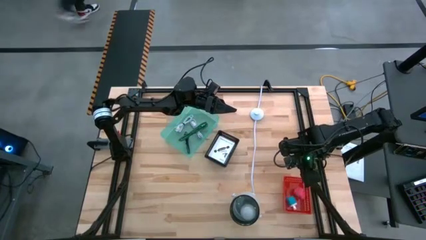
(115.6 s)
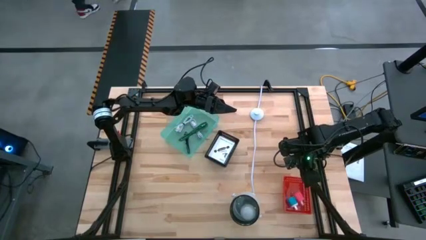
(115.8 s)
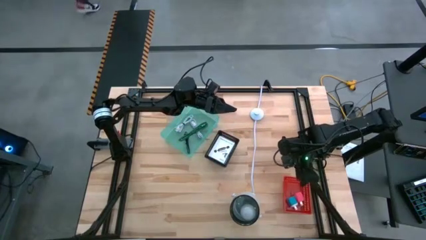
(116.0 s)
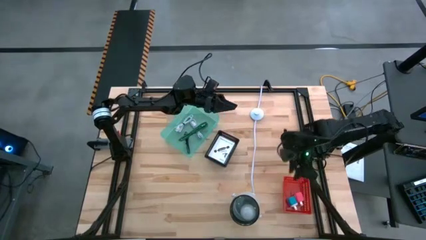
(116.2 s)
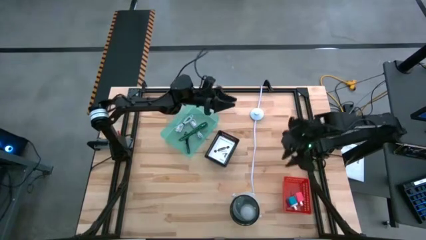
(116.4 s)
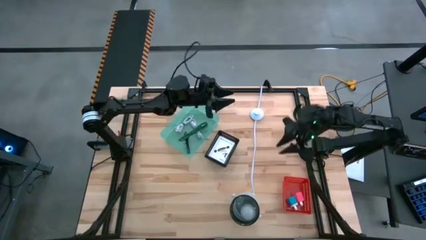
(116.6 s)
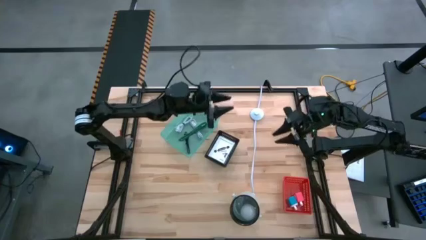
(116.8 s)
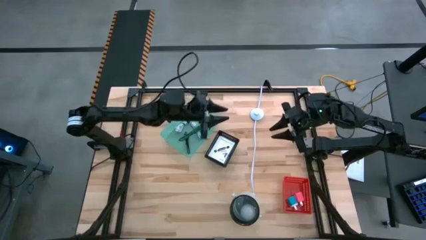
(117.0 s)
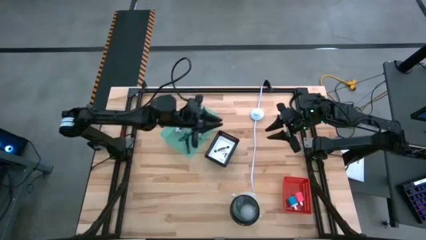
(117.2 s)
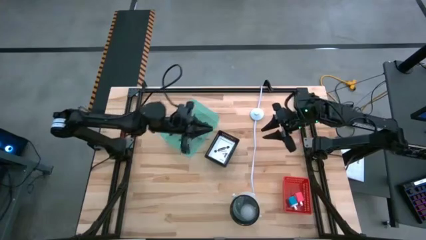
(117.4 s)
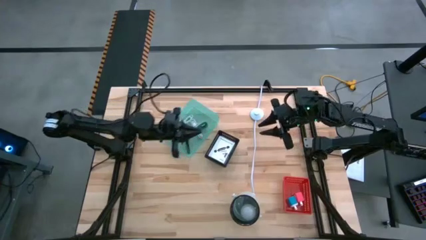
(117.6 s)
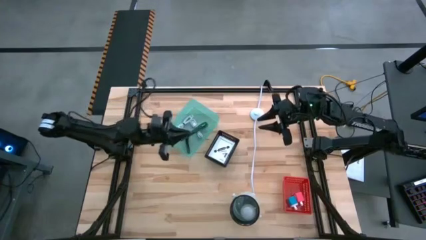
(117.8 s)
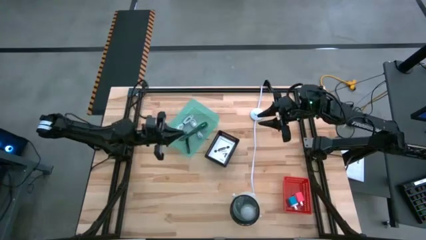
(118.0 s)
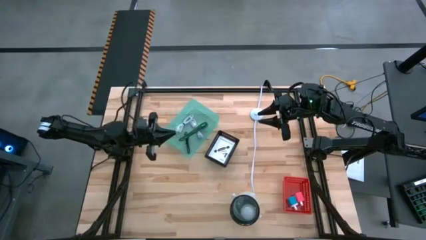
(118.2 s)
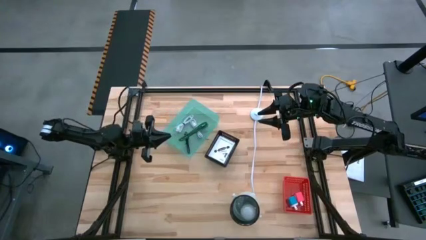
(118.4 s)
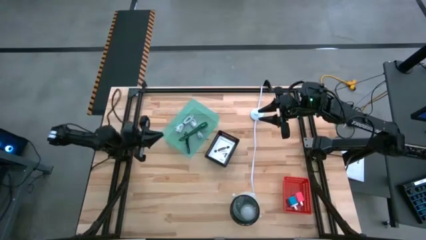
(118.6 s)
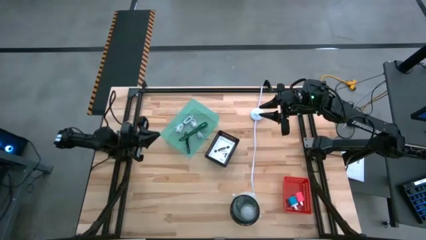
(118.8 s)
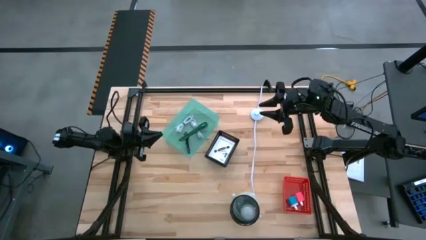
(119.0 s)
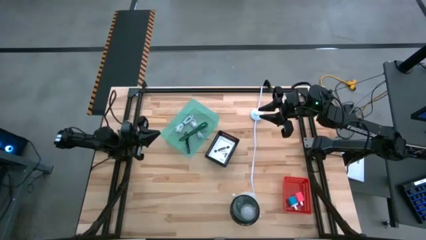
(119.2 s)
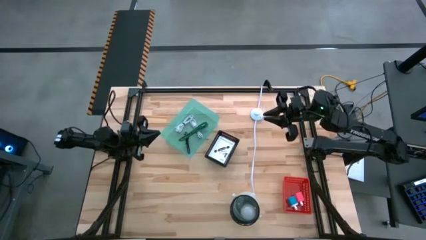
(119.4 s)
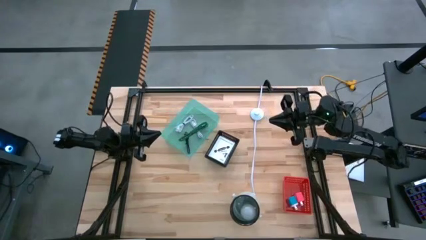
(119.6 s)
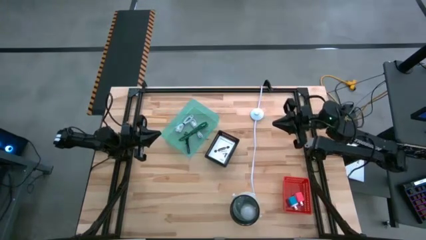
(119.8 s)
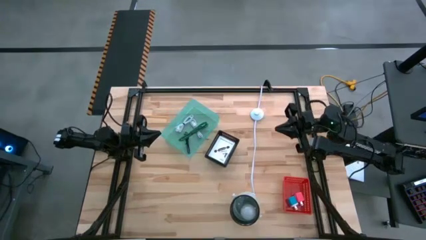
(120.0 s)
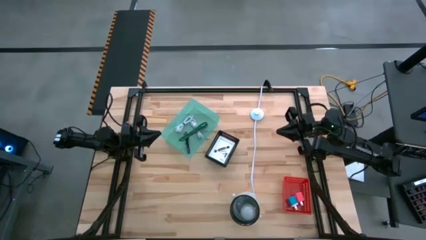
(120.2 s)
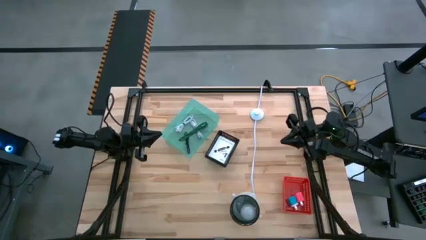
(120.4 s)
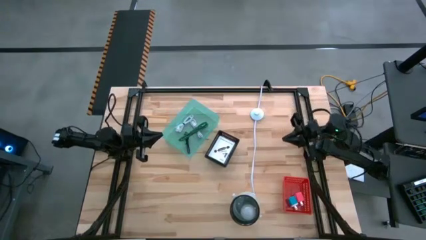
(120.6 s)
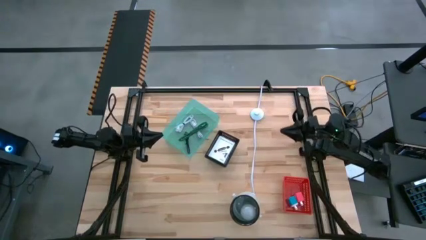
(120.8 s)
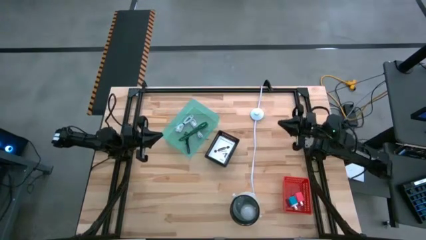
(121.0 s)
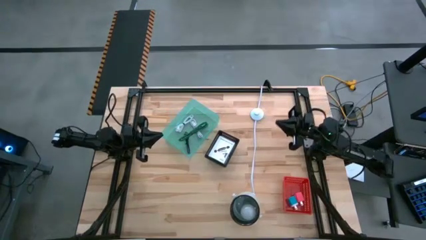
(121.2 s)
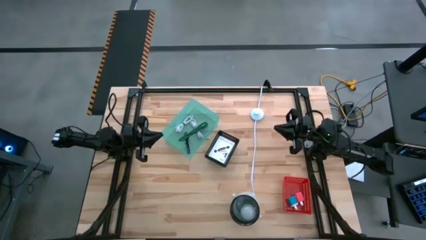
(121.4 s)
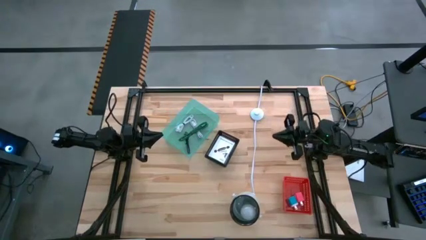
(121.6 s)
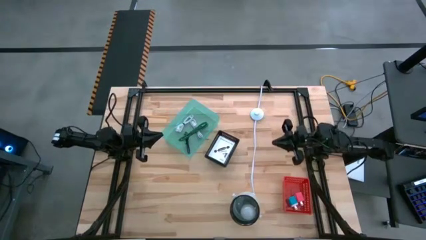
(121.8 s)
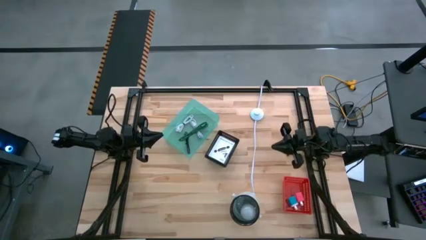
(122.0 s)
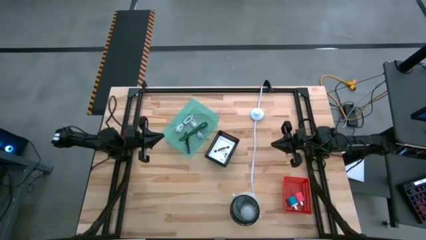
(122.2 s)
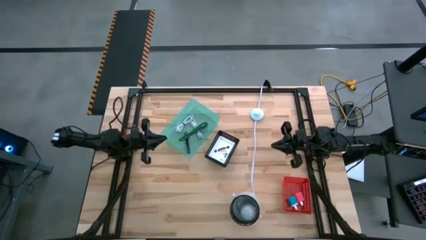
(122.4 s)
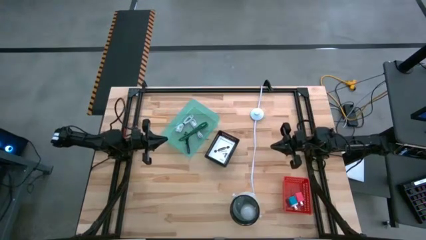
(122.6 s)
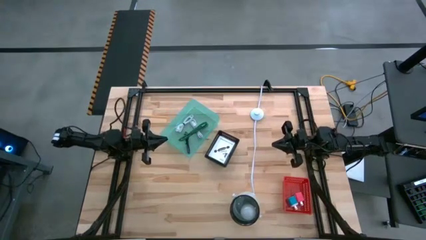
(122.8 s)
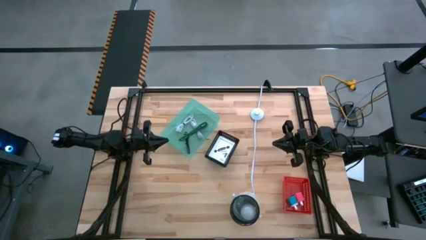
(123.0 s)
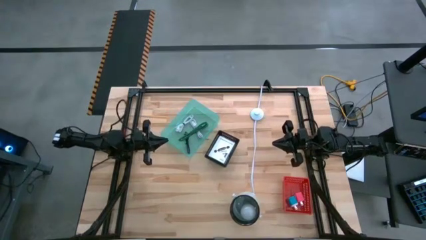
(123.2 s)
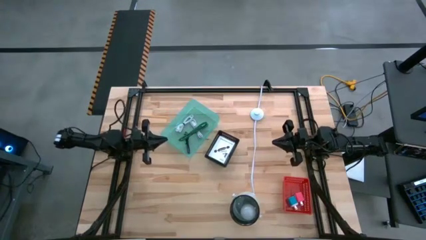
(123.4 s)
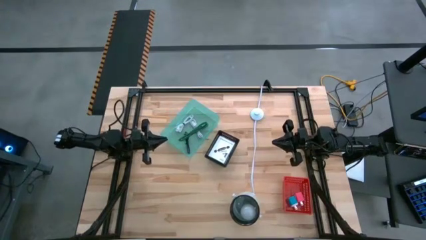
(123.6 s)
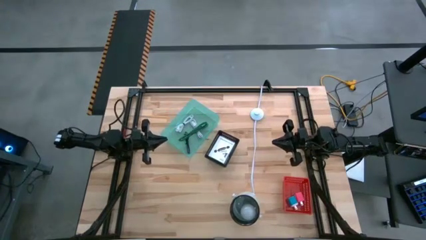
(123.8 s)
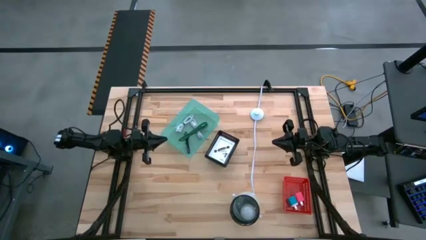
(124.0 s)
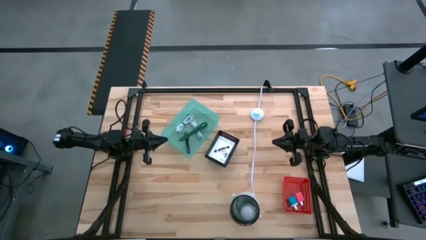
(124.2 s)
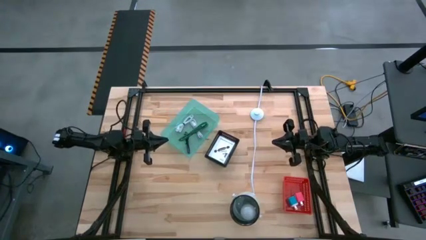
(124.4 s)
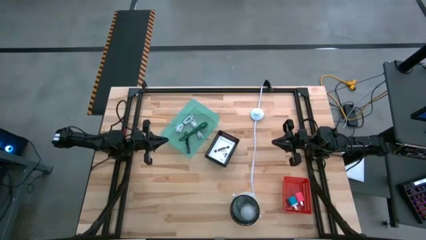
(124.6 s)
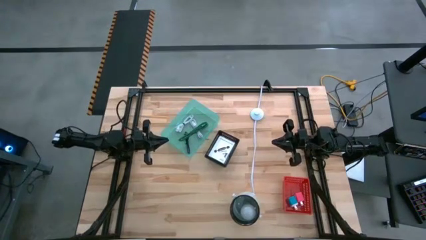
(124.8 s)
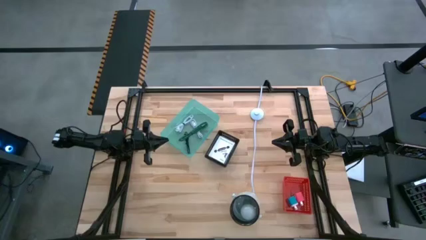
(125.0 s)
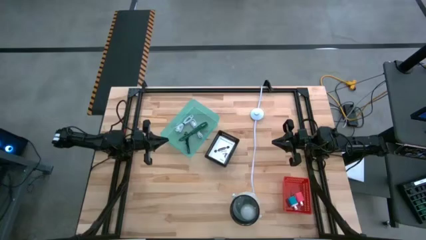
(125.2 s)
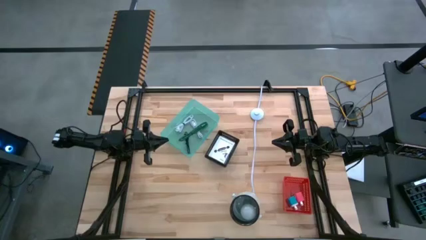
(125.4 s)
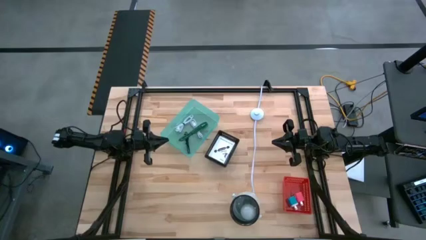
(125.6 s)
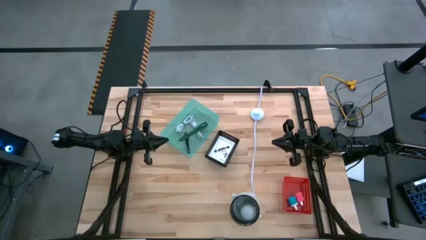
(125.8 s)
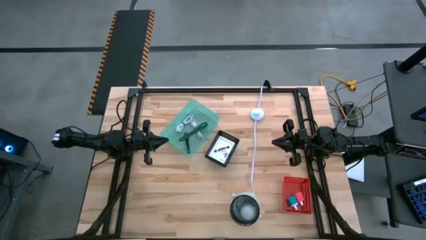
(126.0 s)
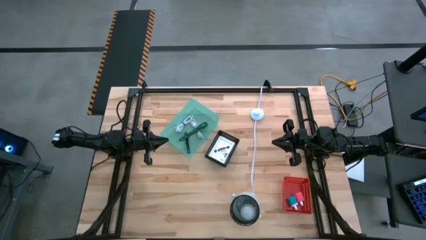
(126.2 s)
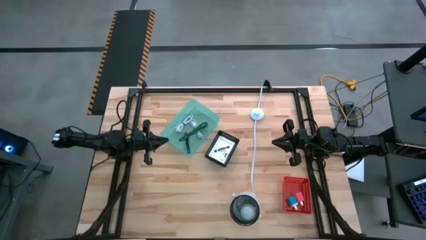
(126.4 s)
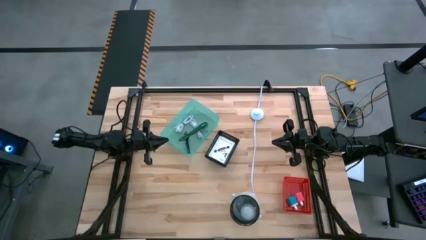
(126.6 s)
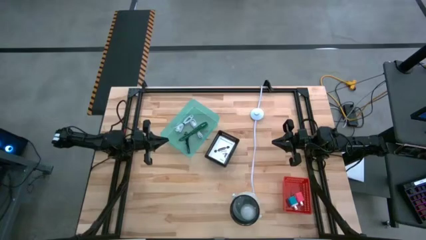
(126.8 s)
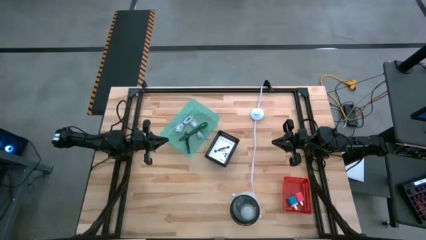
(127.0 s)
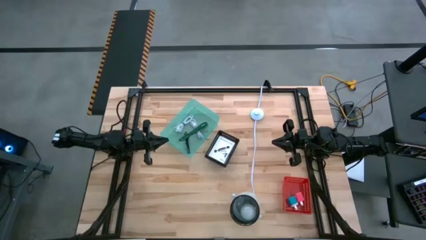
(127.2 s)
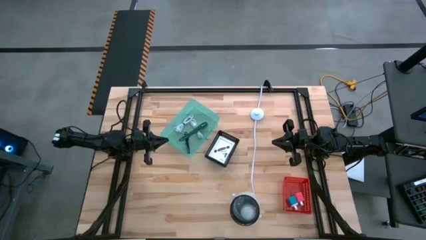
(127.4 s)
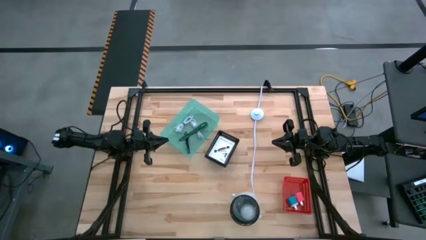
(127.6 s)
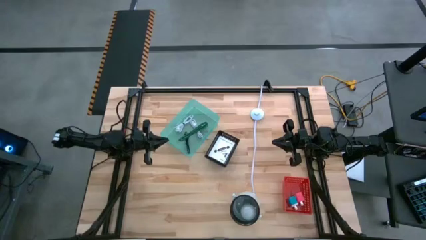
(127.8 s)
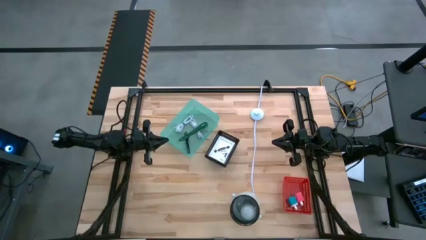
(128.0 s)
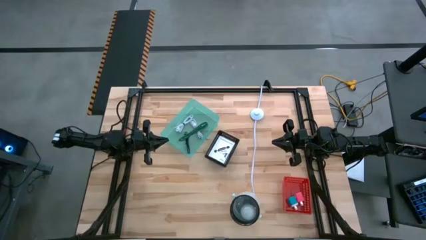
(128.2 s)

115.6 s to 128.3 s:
Task: Pick and place items into bin
Return to Home Position

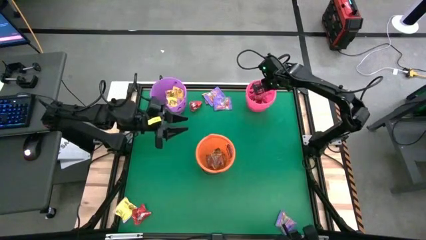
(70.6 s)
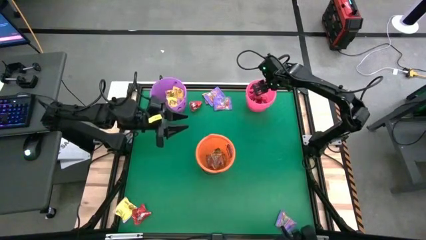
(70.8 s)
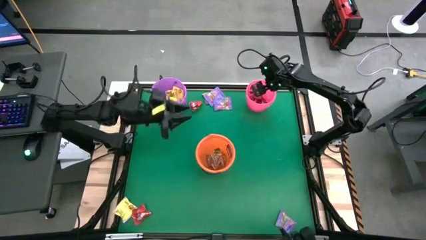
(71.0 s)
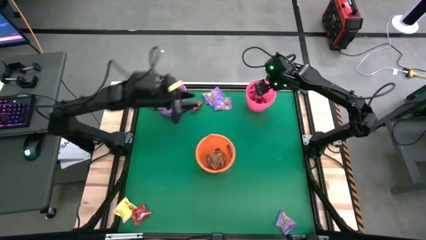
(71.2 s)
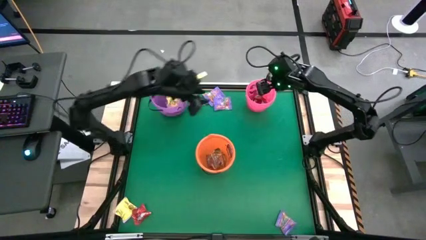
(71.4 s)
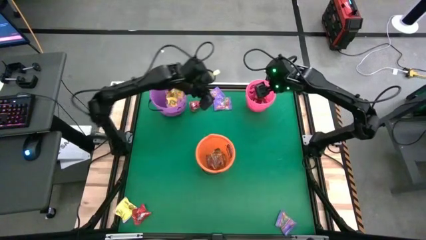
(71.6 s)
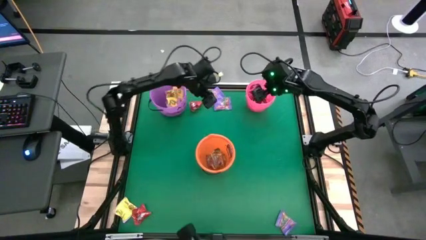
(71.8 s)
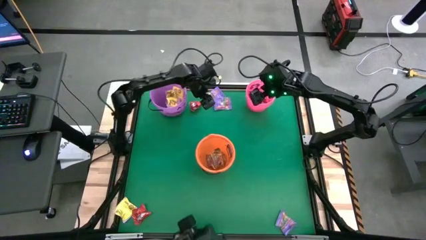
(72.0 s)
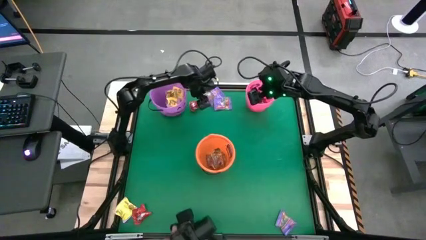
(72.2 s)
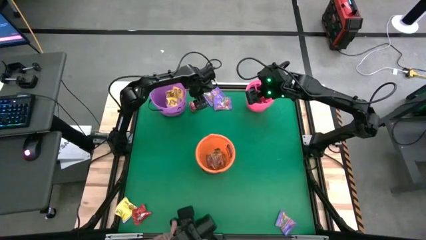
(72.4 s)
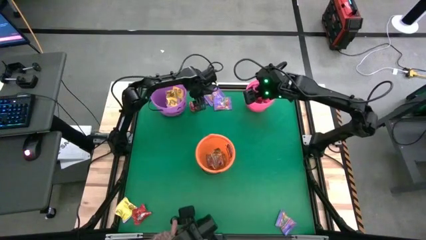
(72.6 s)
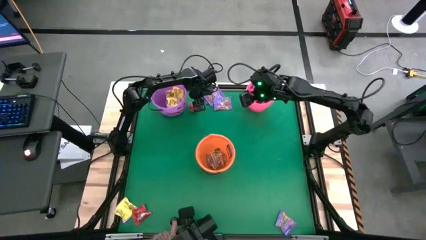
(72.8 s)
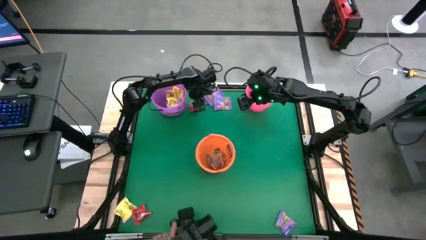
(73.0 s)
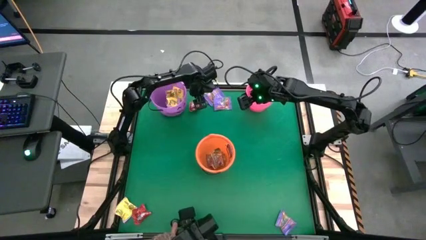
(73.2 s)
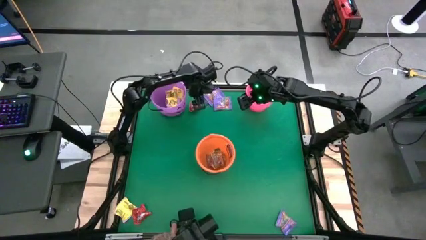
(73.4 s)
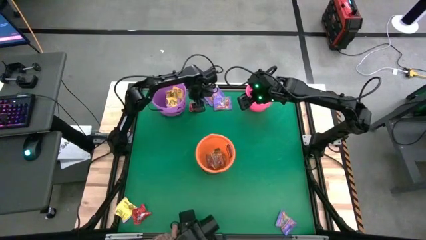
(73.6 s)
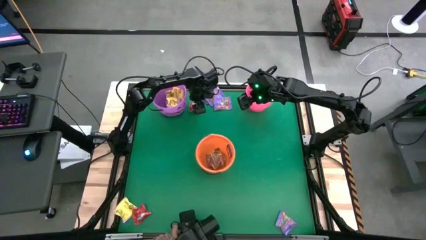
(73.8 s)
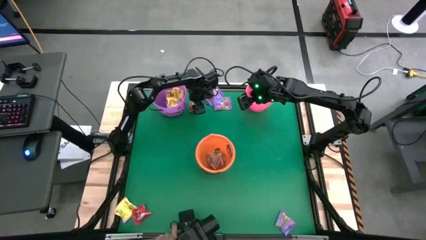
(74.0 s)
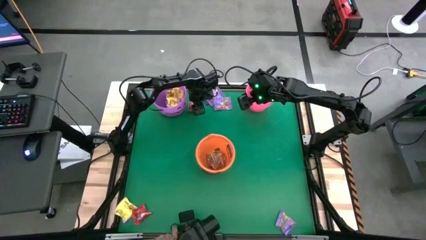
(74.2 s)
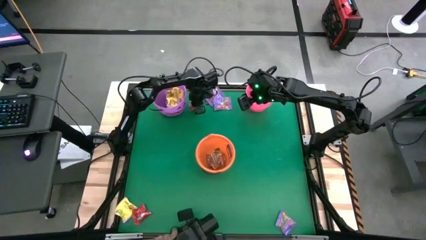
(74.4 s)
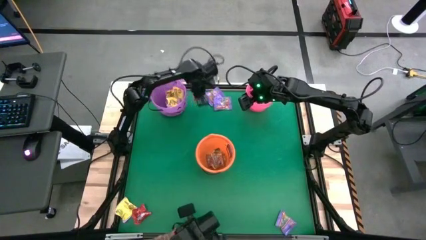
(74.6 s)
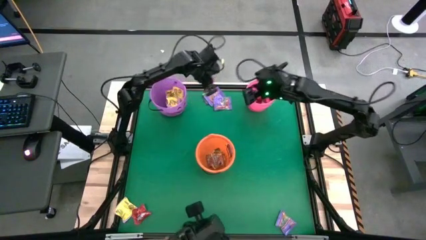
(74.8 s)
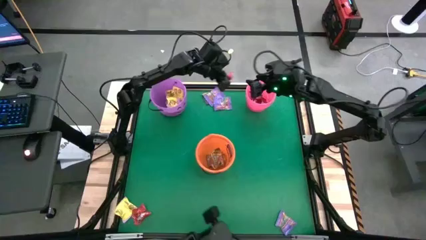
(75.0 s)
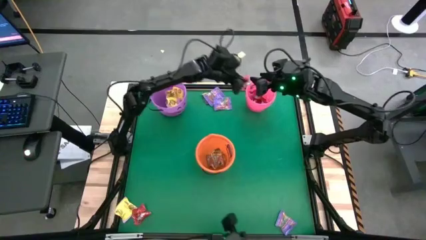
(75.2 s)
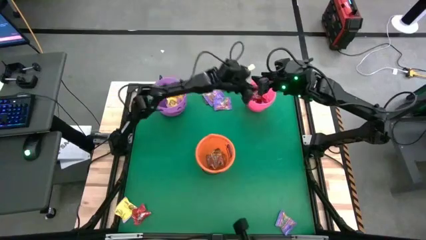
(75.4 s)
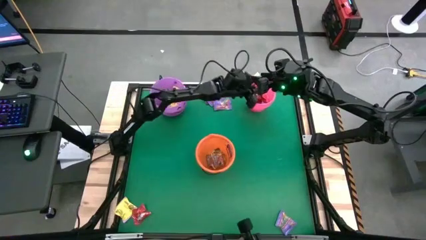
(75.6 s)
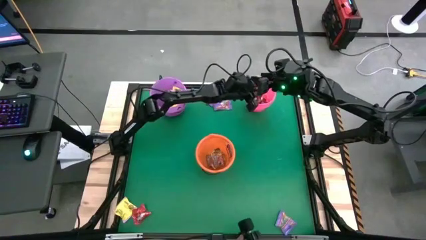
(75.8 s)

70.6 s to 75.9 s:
Task: Sort candy by brand, put in halloween buckets
Put the red candy into the pink bucket
